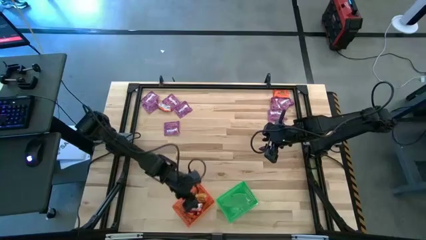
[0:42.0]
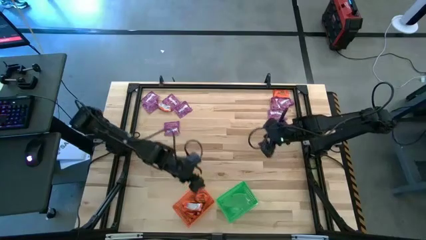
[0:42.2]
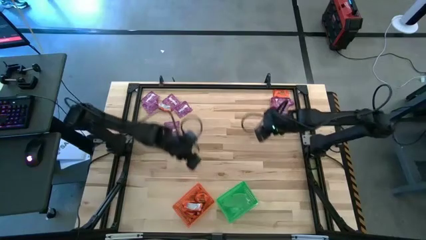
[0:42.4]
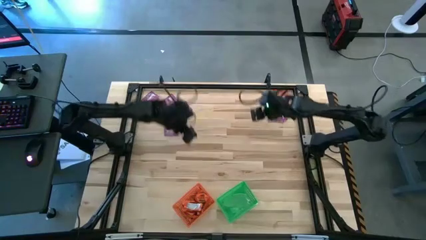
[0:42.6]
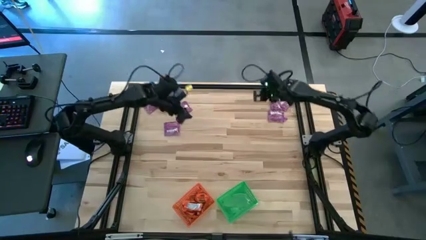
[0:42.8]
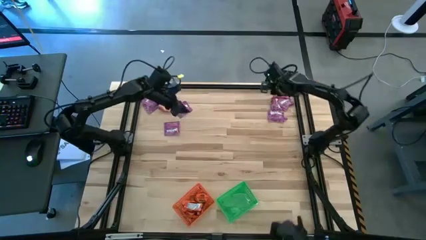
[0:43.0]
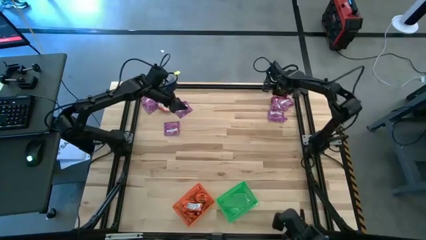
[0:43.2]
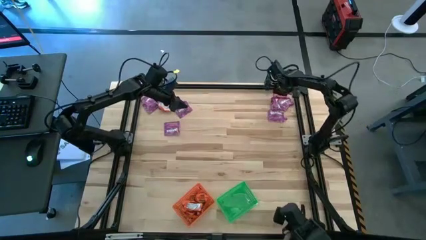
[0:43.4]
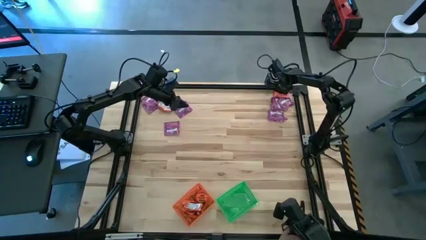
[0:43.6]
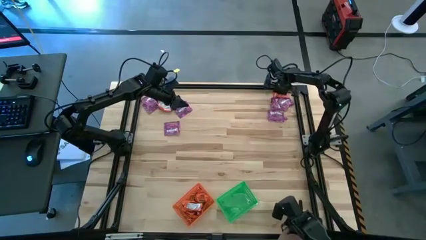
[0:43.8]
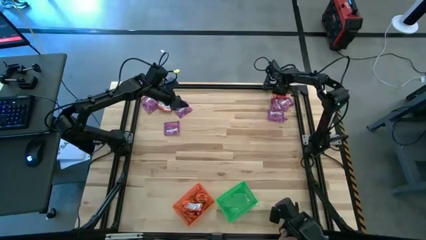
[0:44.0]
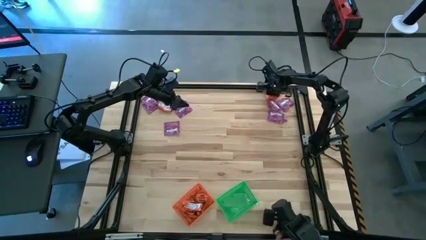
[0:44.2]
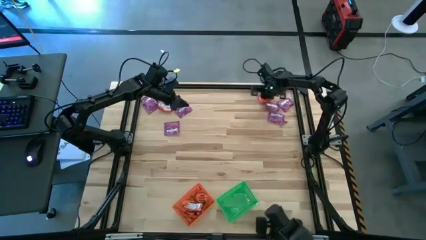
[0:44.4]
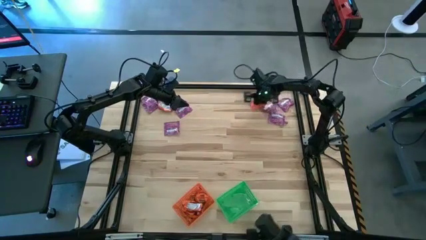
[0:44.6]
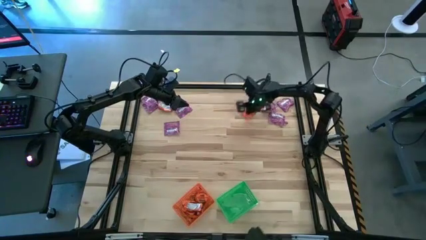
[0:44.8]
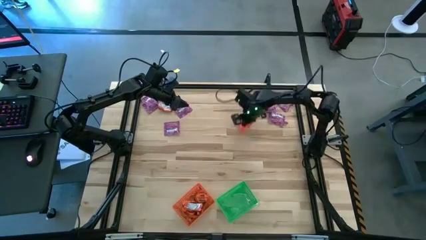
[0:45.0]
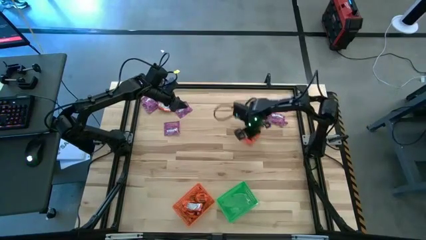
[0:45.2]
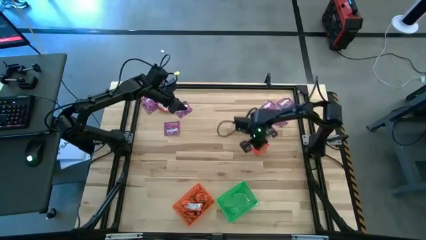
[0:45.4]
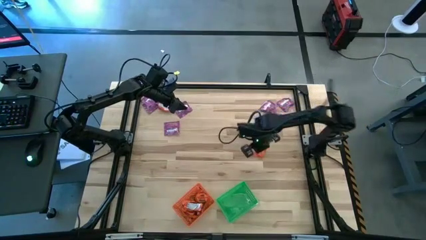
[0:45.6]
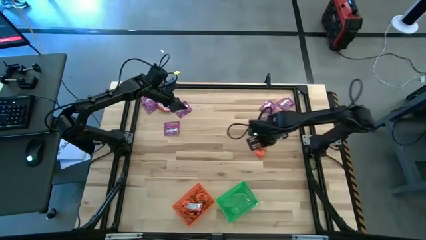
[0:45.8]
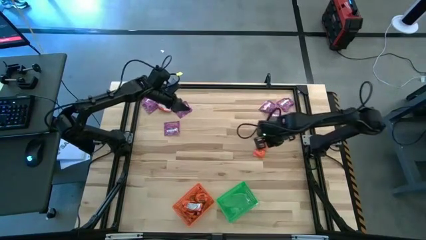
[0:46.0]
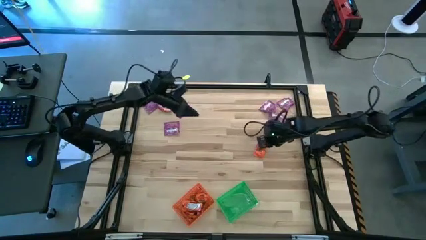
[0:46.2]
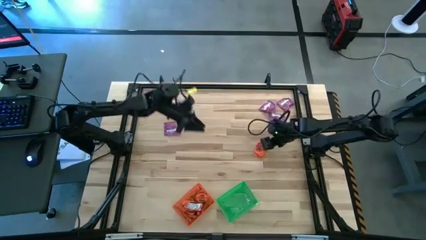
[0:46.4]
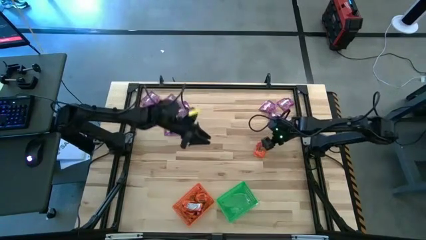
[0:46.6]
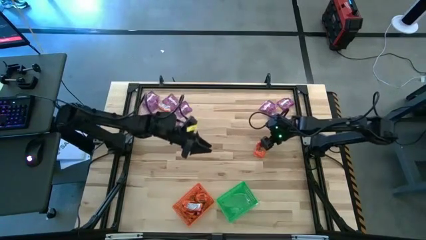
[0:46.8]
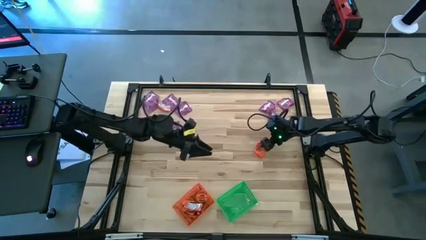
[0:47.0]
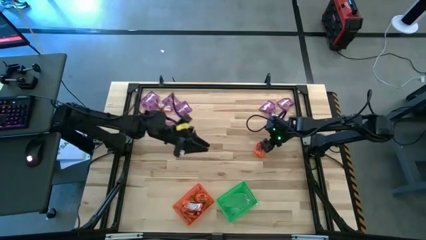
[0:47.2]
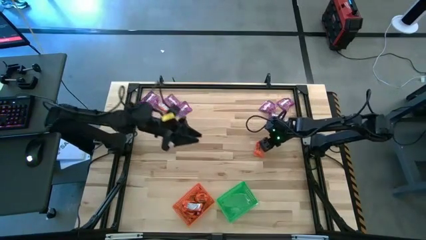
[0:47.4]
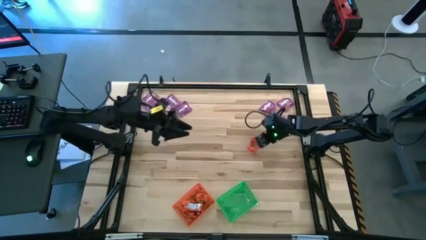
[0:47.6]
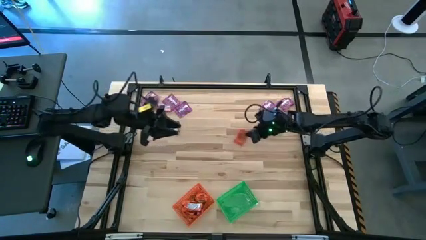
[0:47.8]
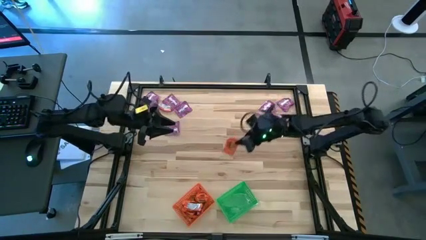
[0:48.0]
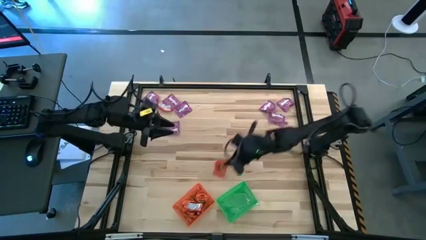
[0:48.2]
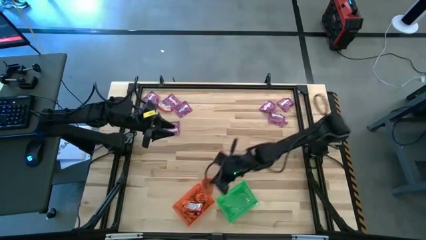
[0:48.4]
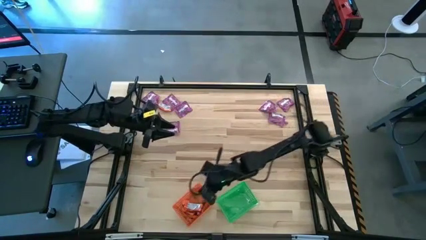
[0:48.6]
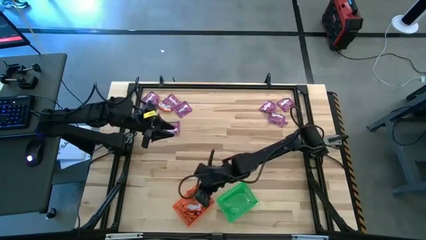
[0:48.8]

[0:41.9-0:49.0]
Task: Sort candy by brand, put in halloween buckets
Put the orange candy into the orange basket

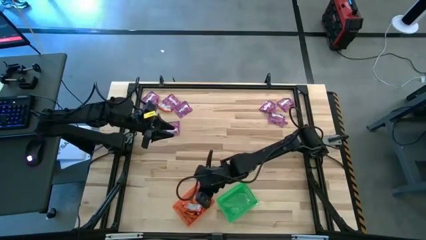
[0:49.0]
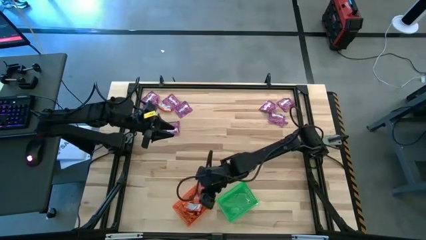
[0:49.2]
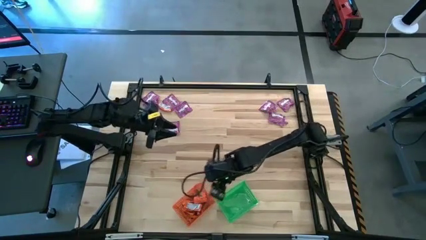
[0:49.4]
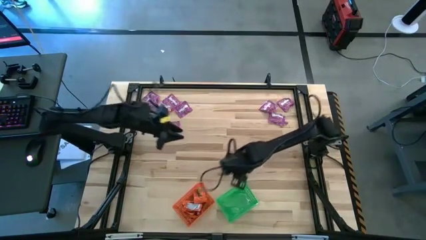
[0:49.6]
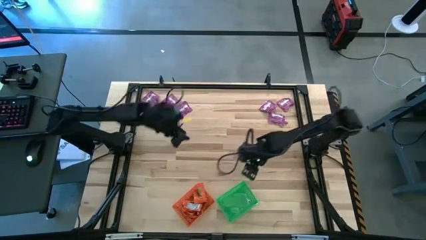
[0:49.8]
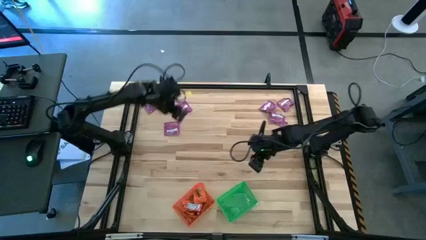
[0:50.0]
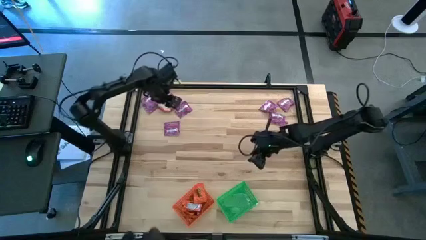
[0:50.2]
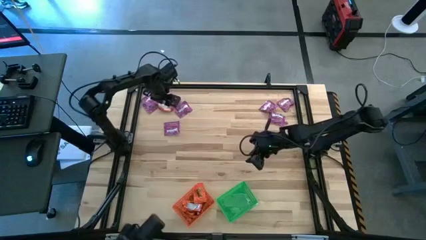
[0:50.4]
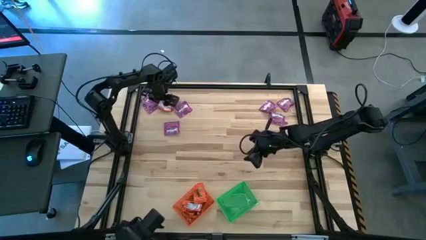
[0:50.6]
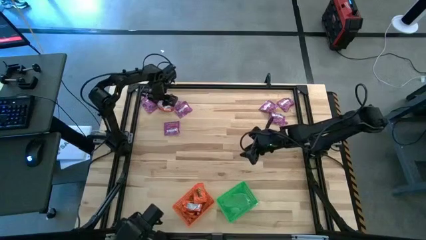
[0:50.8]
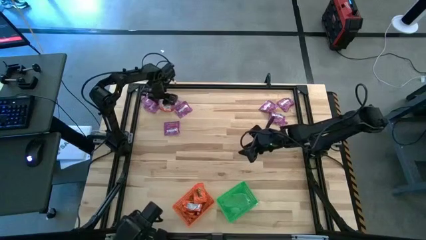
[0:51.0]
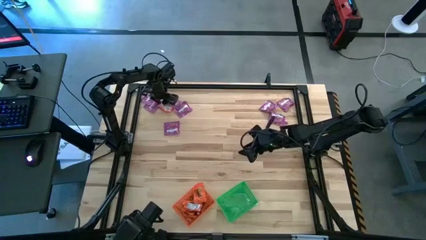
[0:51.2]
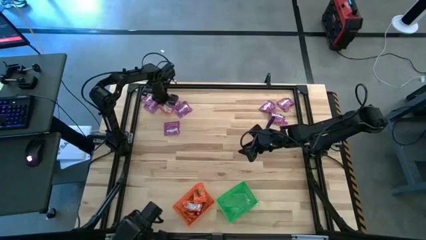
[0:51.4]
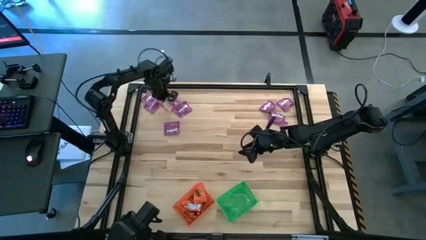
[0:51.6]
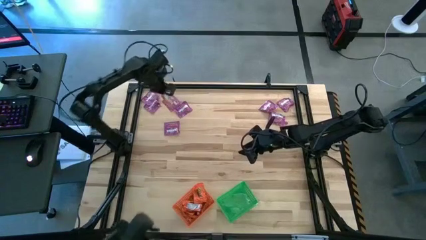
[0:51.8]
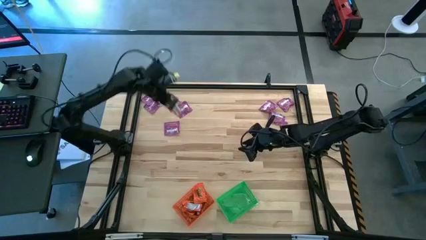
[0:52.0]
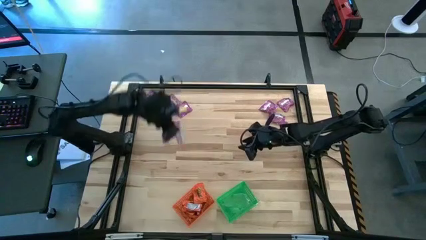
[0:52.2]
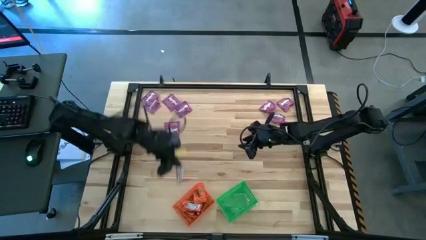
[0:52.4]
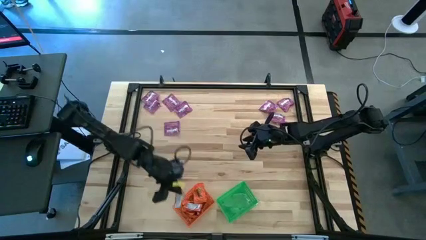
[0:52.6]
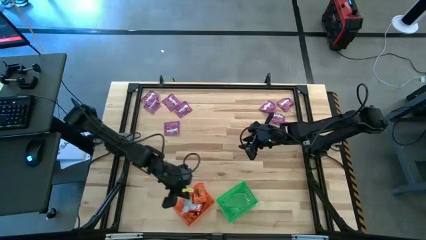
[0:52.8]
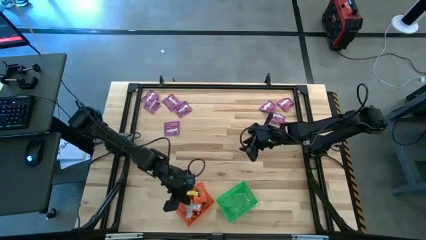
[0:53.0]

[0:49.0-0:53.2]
Put the orange candy into the orange basket

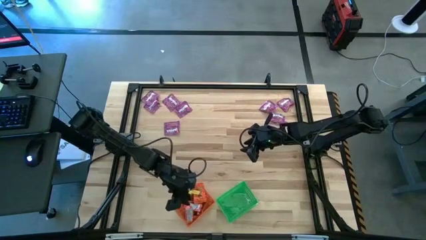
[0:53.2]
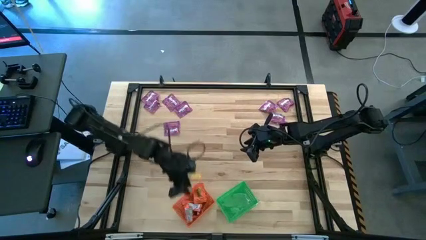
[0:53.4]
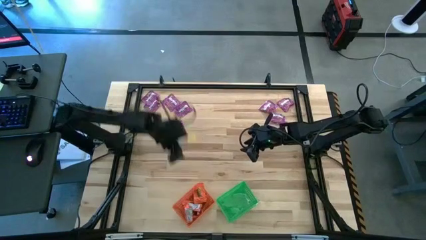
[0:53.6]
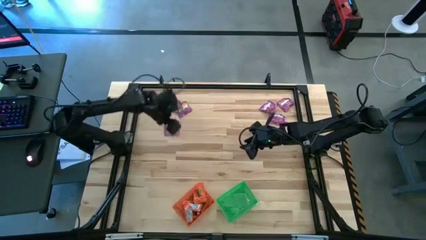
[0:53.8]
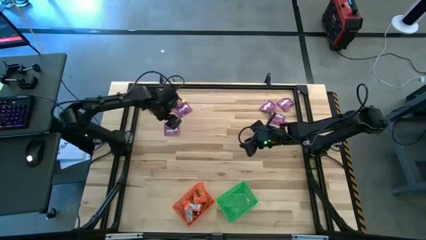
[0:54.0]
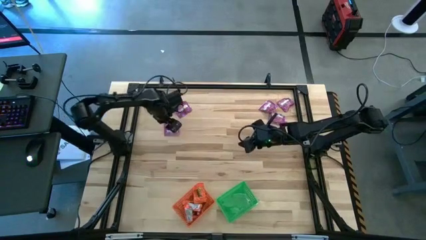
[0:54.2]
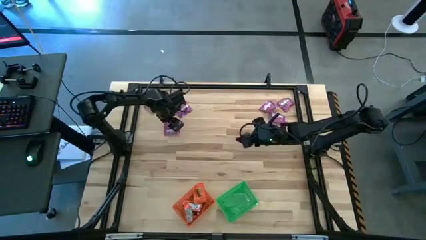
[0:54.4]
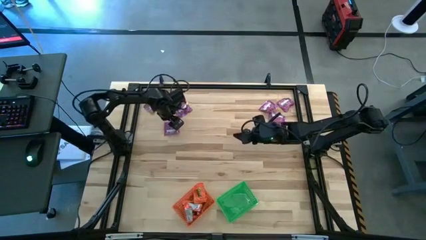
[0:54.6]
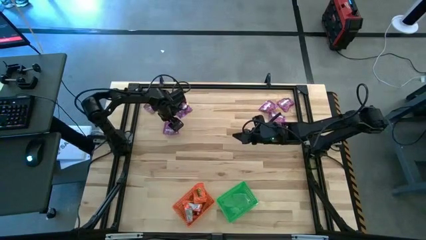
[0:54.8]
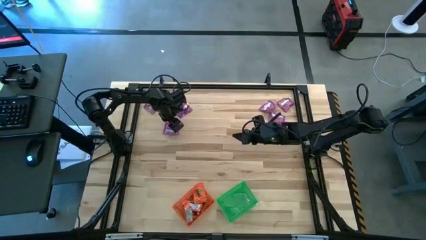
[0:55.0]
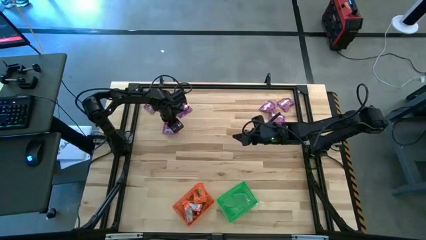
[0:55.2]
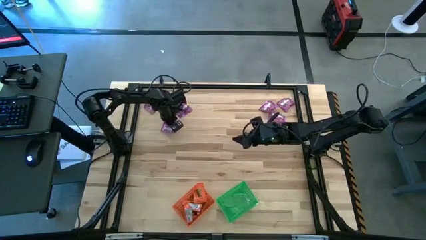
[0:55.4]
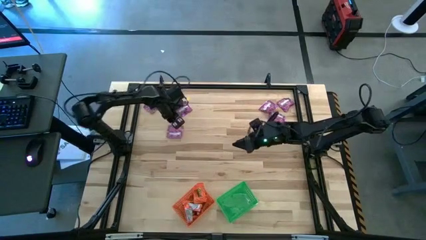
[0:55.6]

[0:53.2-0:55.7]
Put the purple candy into the green basket

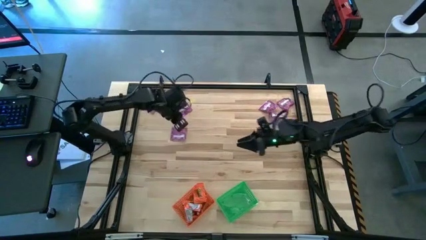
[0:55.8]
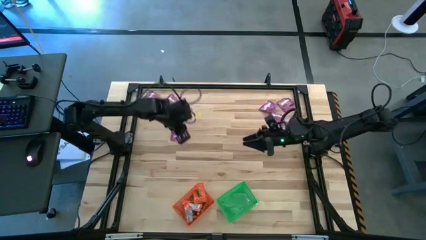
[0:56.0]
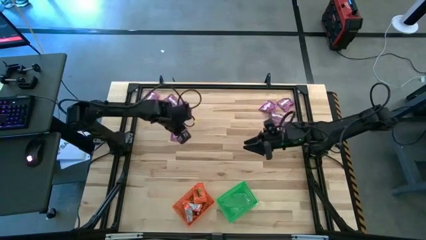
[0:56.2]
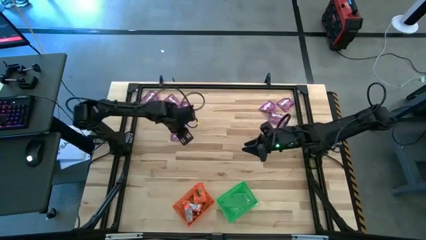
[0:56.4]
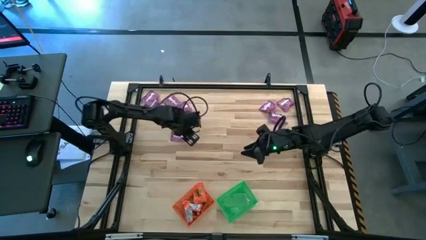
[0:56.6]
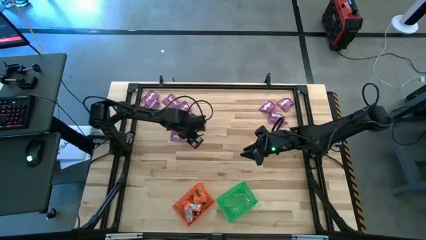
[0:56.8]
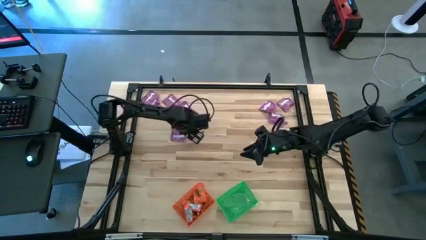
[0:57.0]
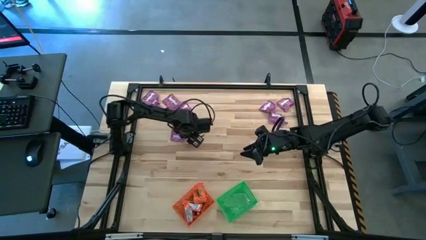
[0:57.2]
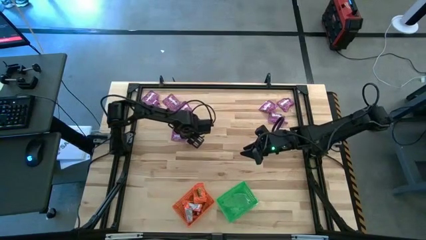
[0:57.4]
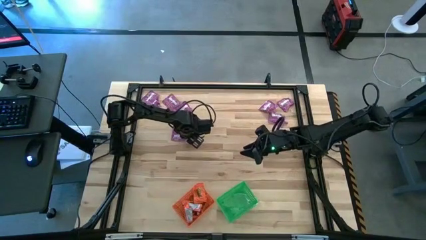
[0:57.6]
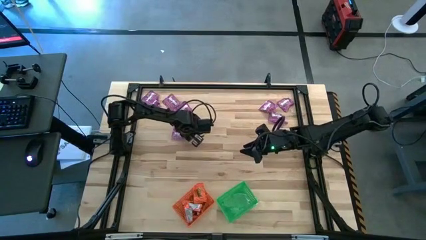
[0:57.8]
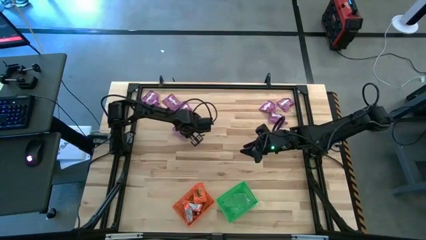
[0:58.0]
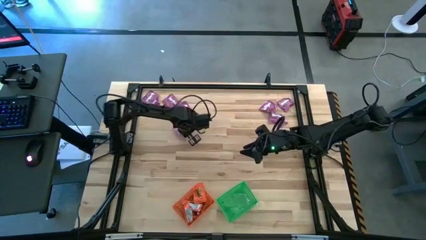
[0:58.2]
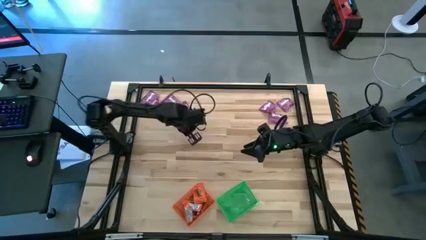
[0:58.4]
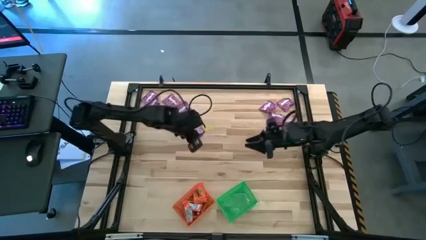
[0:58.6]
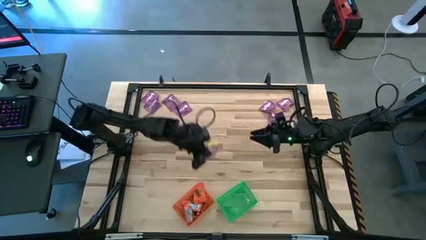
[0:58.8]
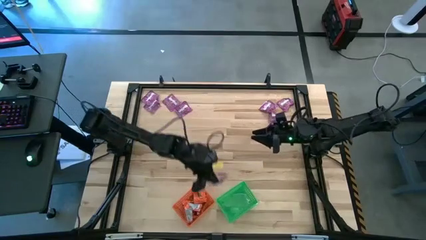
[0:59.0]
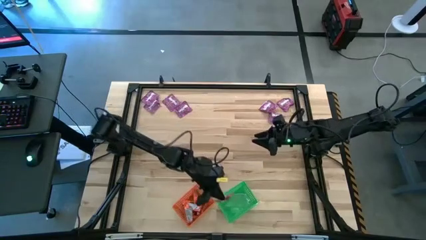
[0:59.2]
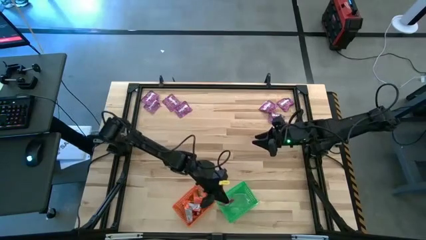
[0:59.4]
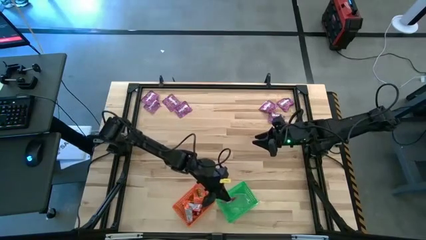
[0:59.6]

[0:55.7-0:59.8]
Put the purple candy into the green basket
